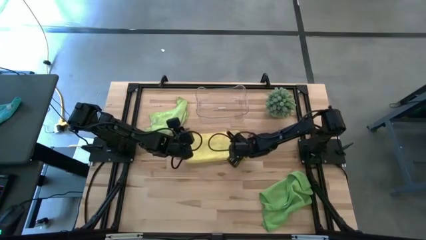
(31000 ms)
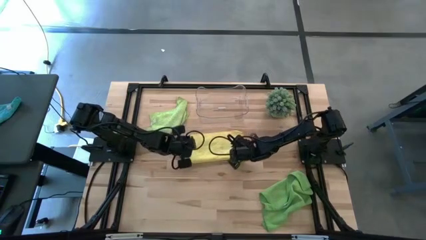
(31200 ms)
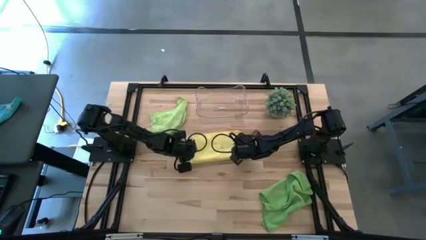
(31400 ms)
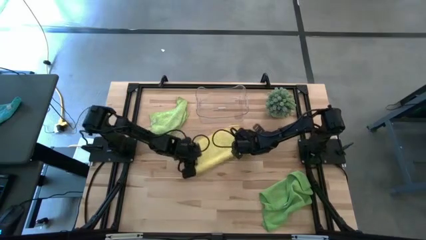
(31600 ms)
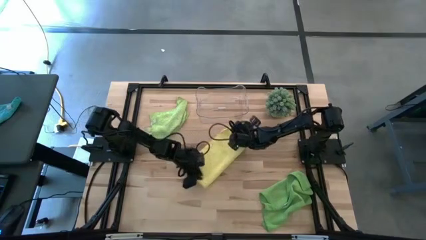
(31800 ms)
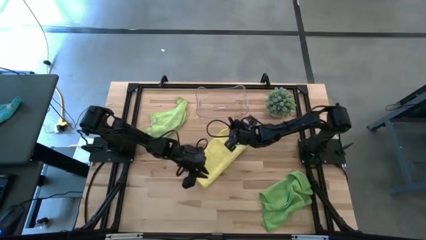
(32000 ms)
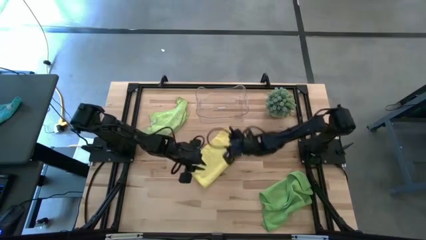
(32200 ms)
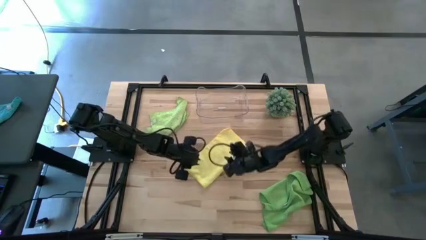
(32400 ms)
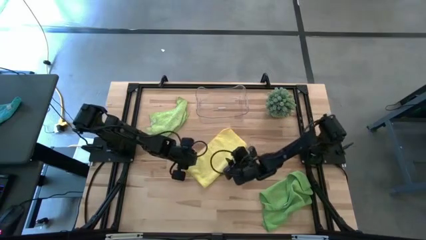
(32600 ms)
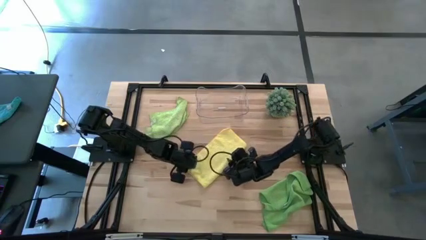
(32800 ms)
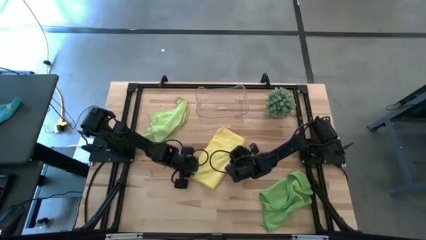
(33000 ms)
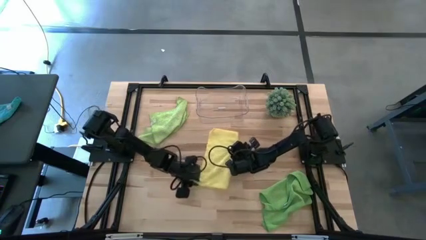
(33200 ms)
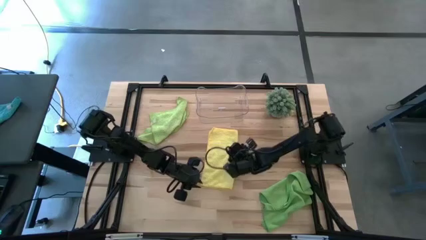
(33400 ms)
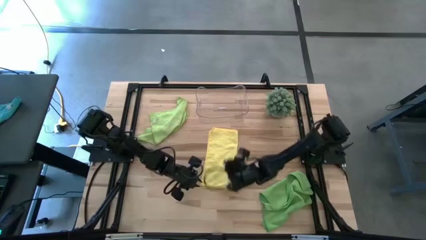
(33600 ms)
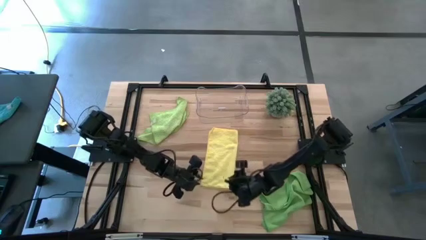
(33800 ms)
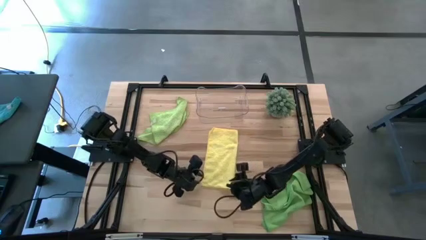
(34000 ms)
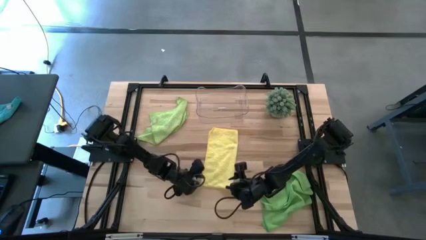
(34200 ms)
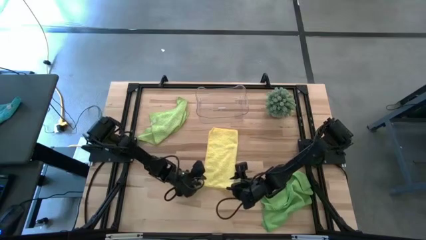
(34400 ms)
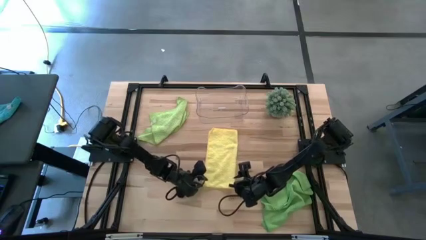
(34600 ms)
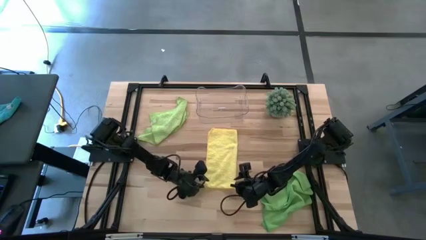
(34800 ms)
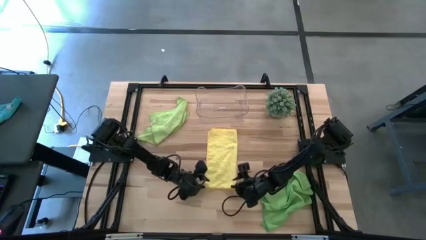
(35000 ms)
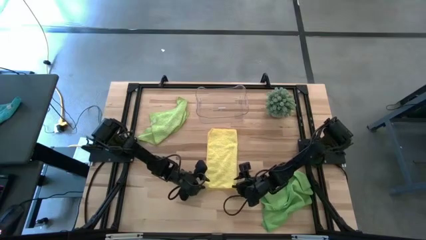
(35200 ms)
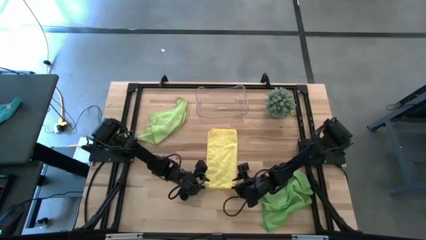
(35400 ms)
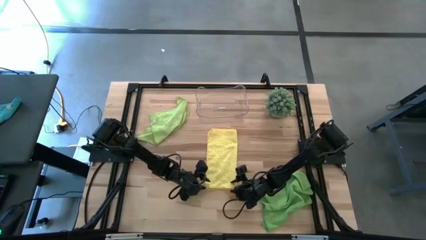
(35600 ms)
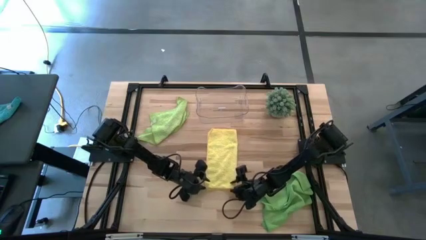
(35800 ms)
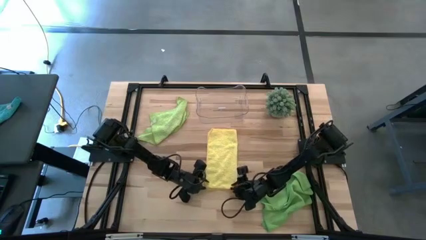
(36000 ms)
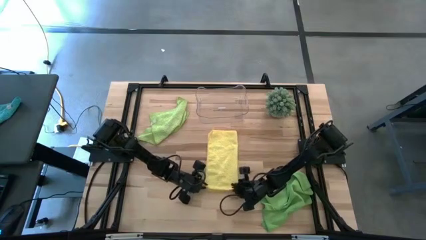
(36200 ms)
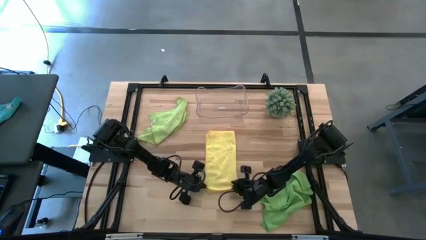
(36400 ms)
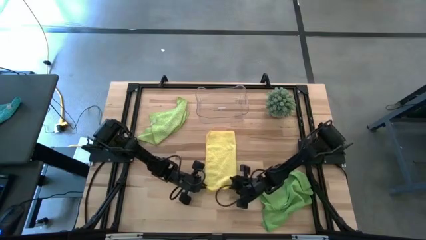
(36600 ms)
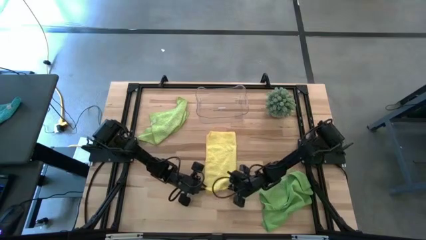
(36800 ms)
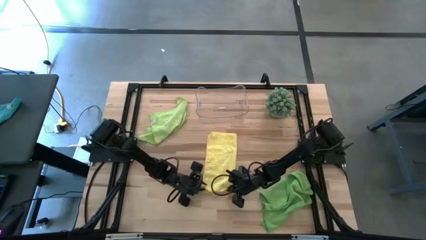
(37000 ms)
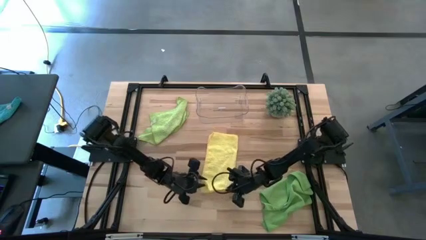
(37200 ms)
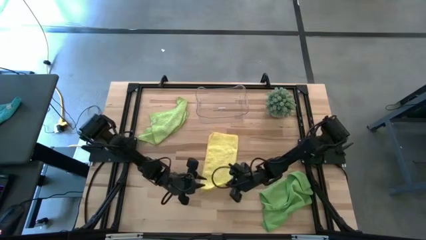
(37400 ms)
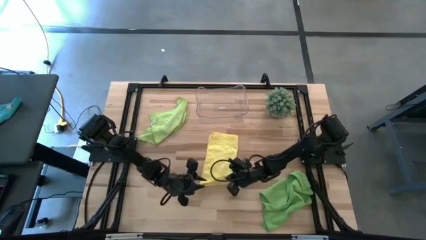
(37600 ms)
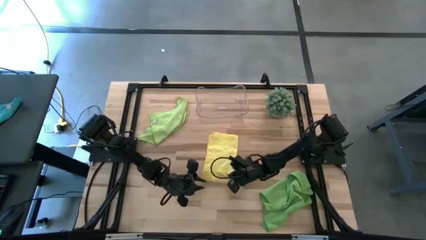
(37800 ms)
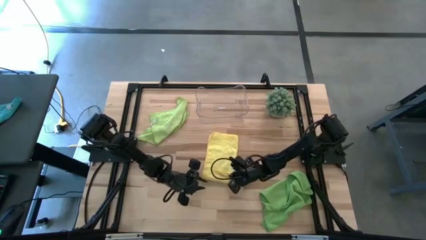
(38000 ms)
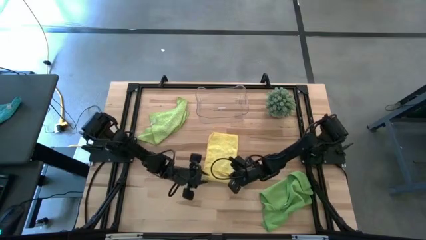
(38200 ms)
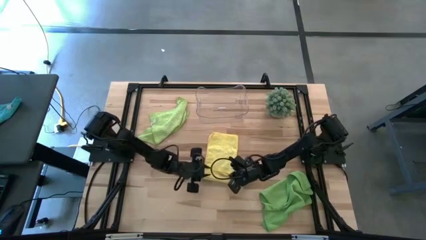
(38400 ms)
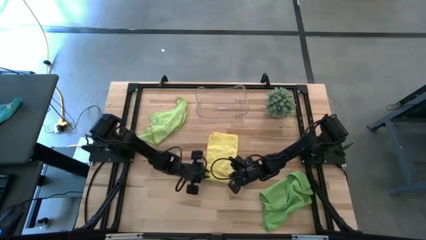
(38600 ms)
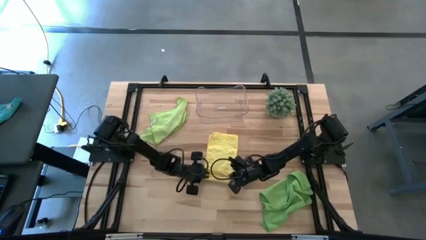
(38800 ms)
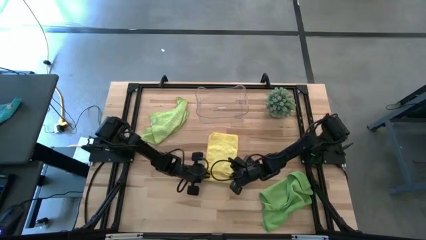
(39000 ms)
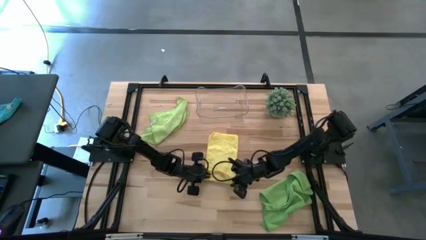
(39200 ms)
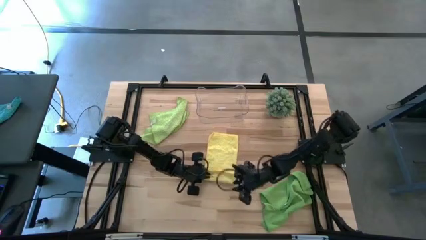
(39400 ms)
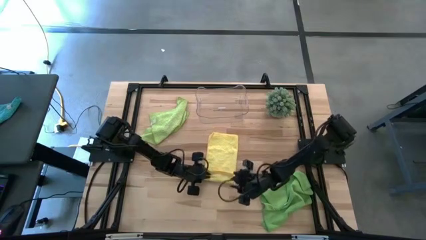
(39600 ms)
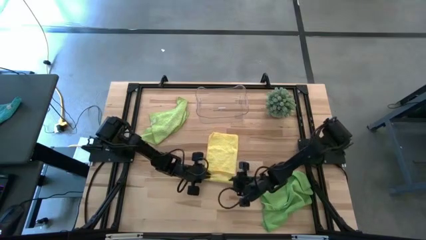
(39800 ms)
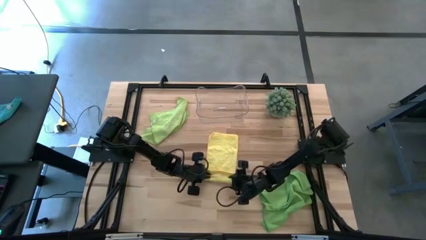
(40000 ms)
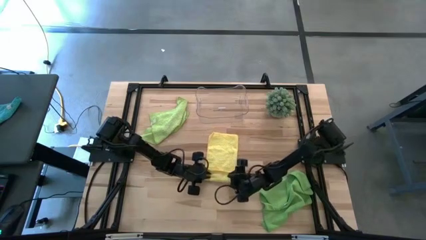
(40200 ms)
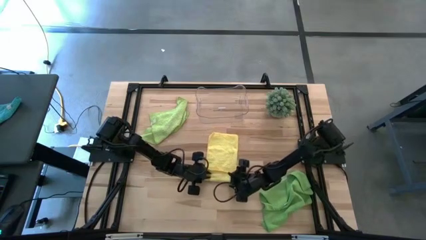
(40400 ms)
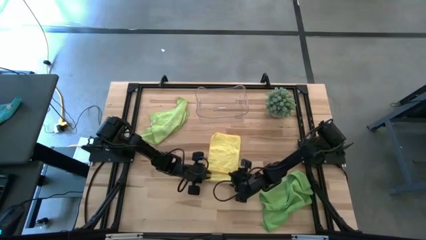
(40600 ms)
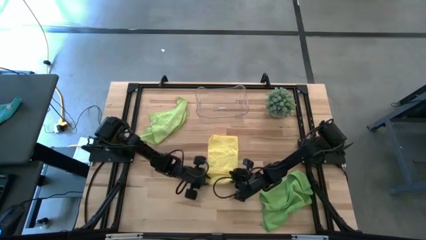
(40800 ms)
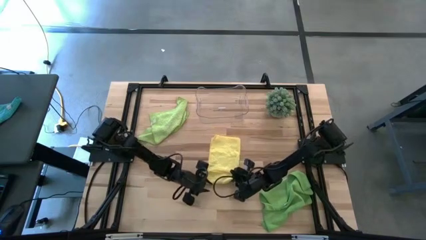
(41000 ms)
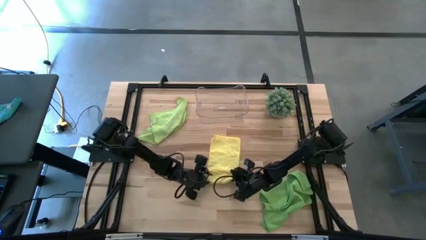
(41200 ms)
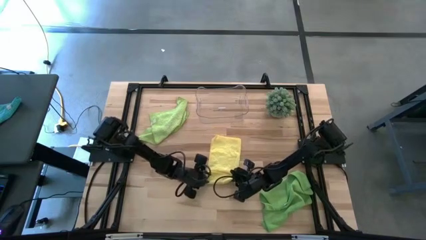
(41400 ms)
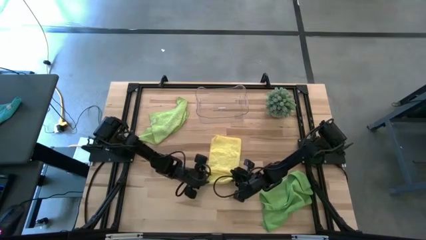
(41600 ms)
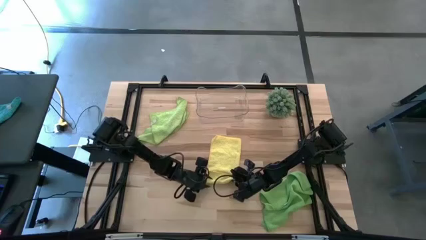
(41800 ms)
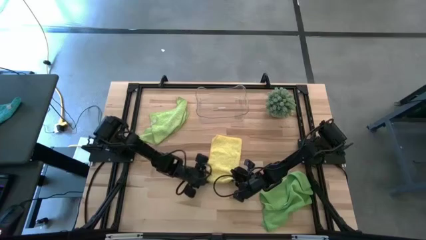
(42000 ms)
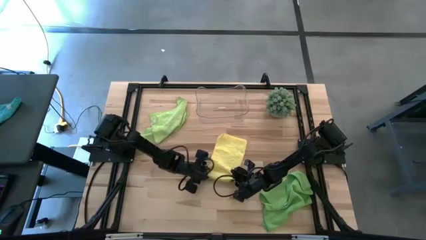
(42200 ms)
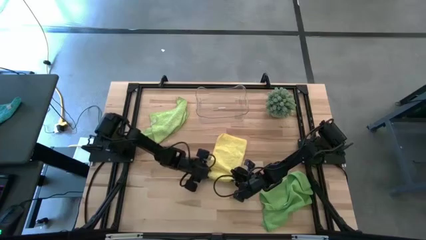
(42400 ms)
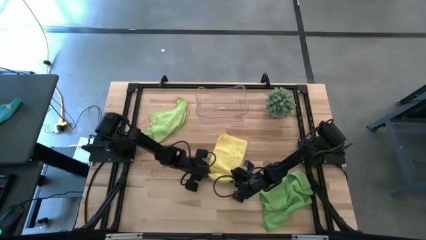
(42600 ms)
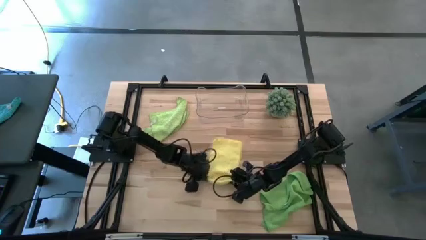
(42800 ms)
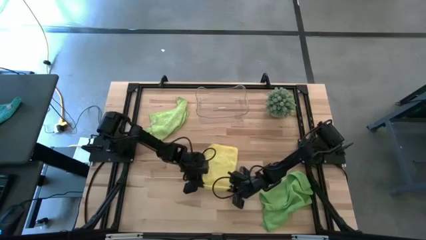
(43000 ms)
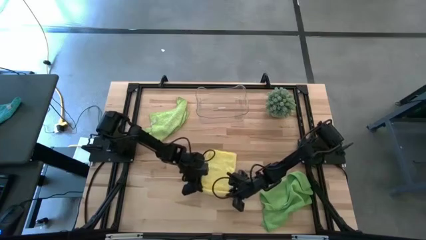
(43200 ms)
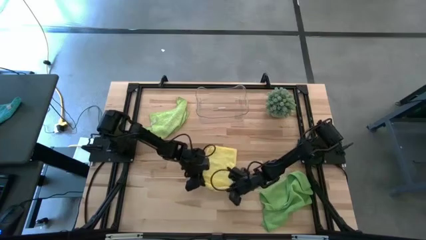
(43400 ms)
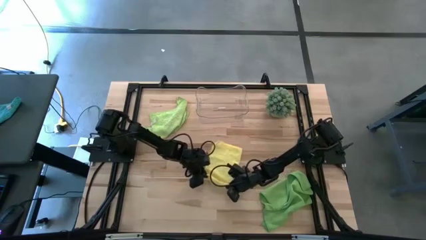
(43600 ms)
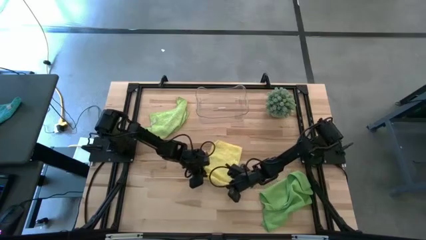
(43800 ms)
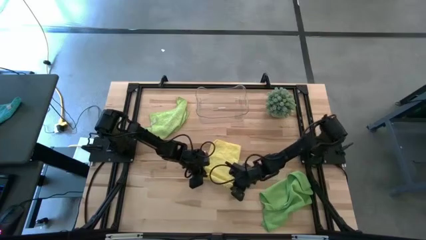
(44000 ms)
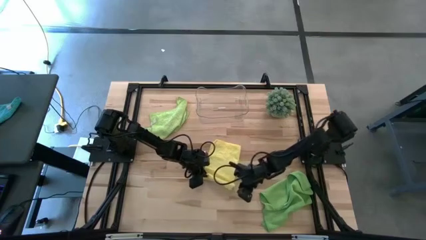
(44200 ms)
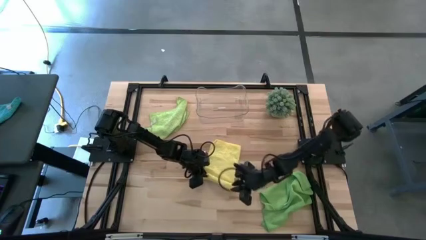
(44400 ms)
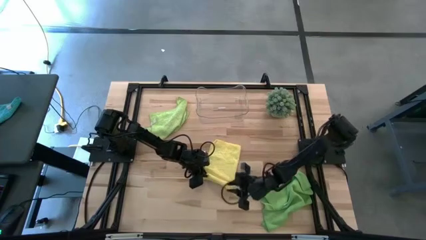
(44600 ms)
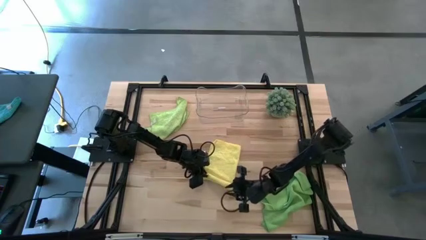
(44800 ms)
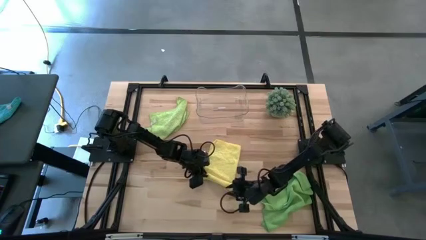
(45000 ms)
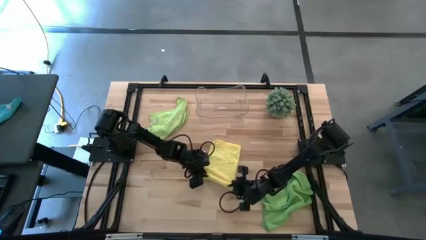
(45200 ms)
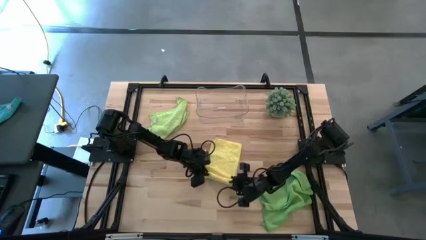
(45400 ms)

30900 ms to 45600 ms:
Task: Roll microfiber towels into tight, uniform cylinder then place into a basket
Roll the yellow microfiber towel
